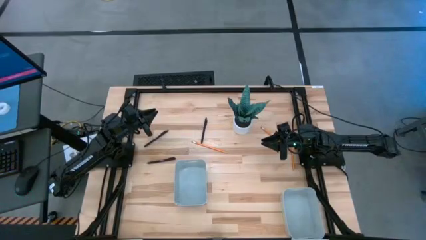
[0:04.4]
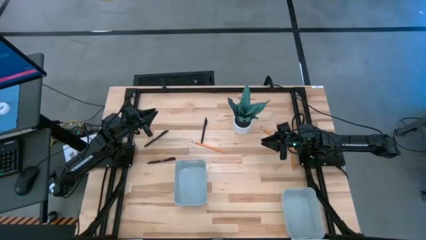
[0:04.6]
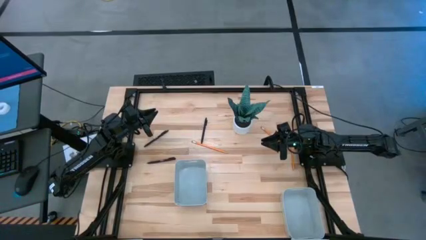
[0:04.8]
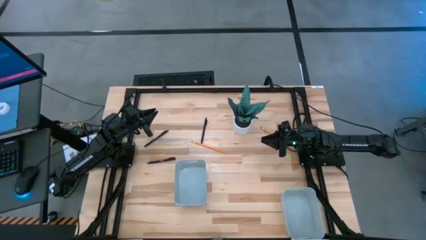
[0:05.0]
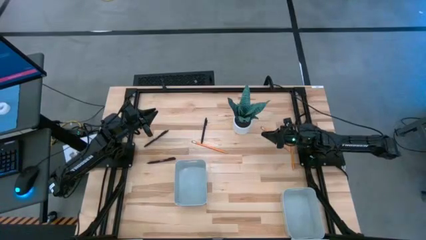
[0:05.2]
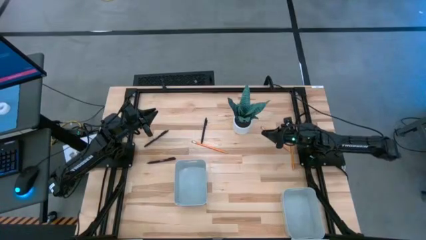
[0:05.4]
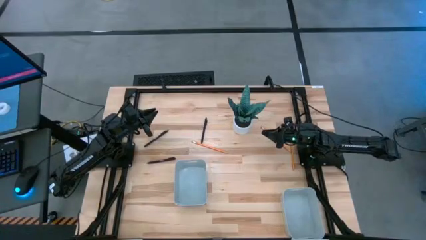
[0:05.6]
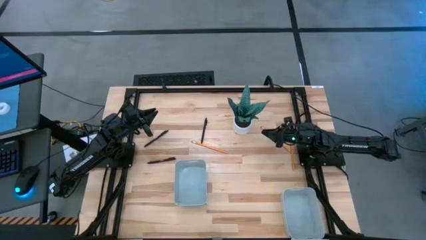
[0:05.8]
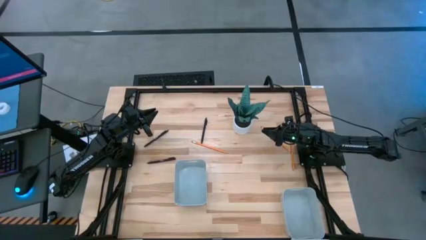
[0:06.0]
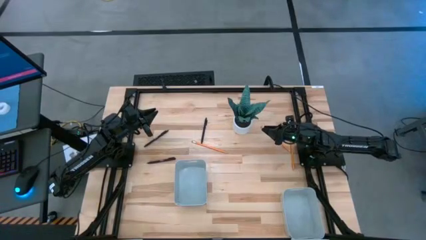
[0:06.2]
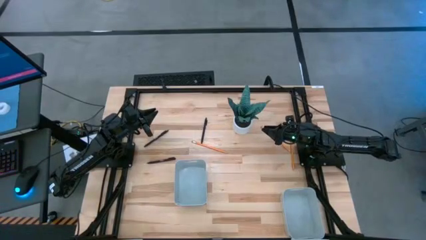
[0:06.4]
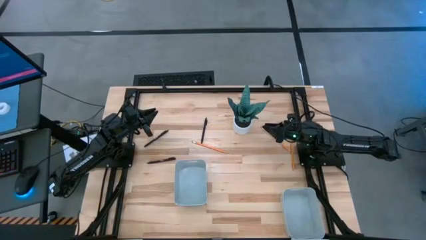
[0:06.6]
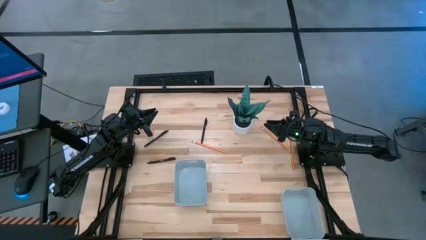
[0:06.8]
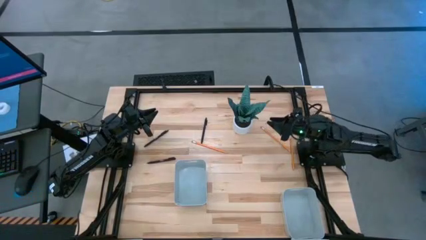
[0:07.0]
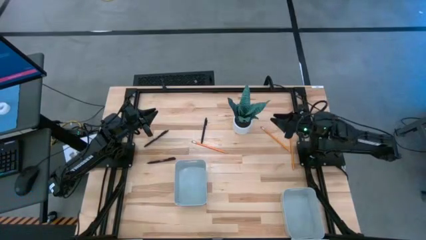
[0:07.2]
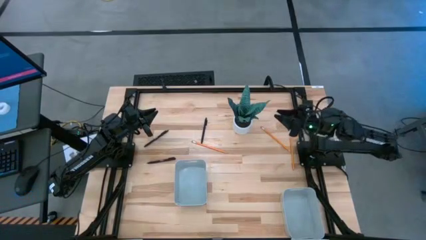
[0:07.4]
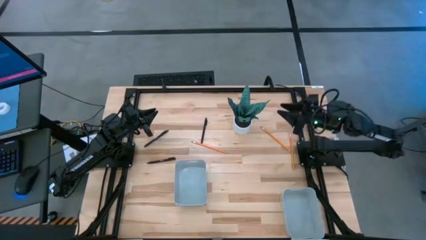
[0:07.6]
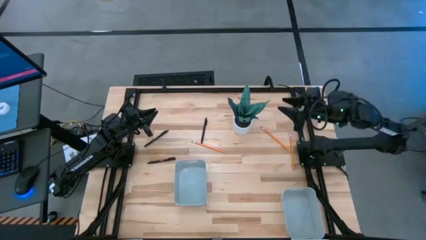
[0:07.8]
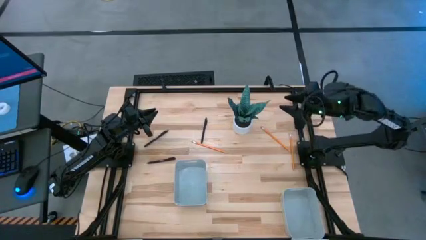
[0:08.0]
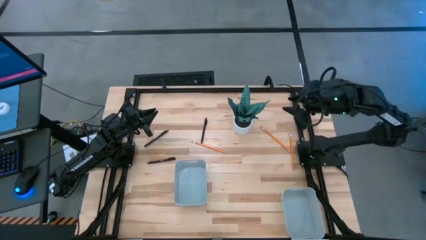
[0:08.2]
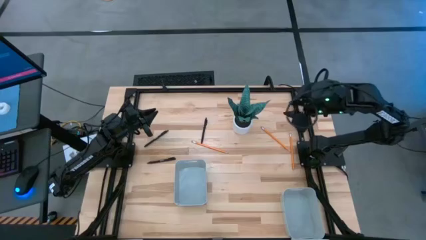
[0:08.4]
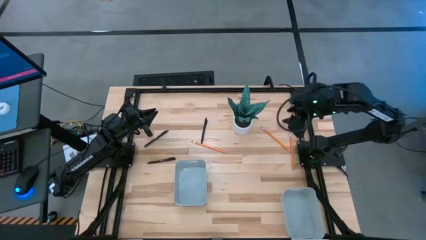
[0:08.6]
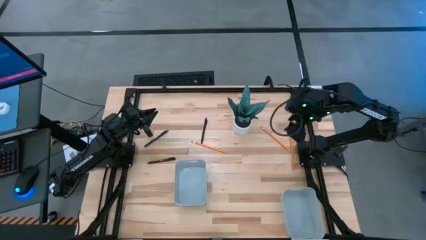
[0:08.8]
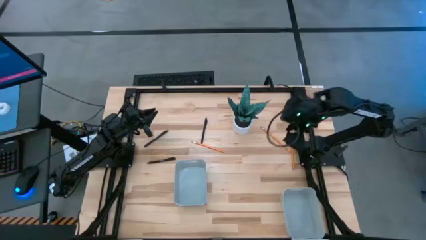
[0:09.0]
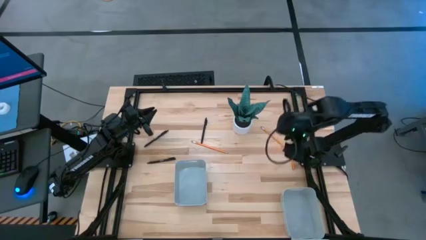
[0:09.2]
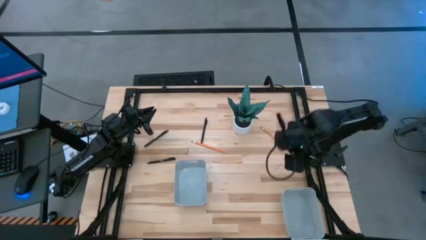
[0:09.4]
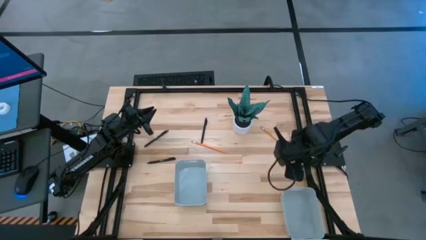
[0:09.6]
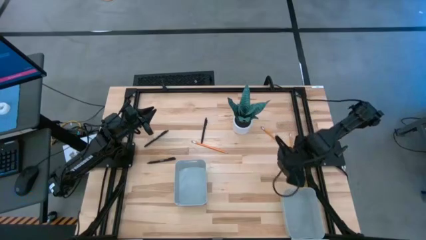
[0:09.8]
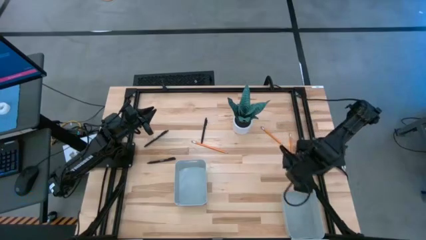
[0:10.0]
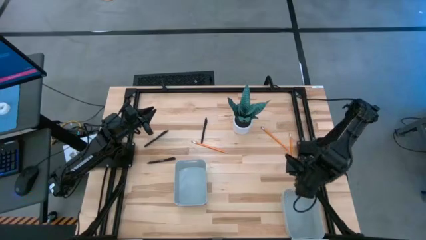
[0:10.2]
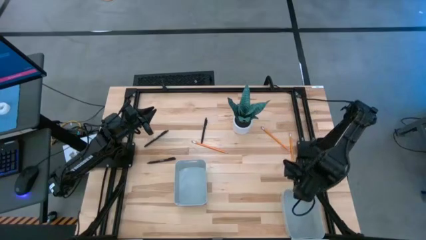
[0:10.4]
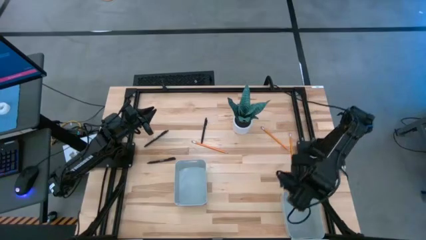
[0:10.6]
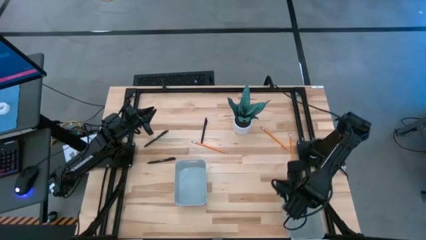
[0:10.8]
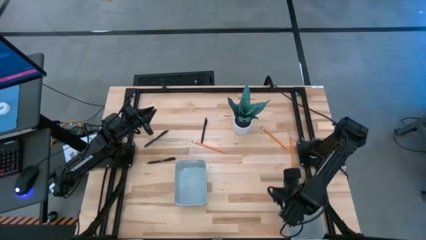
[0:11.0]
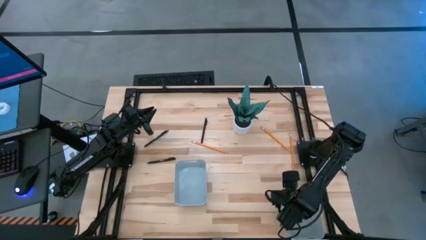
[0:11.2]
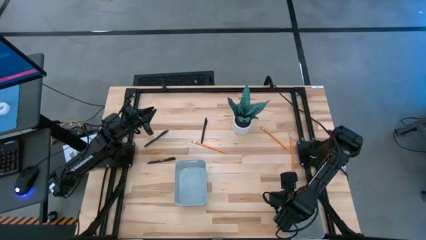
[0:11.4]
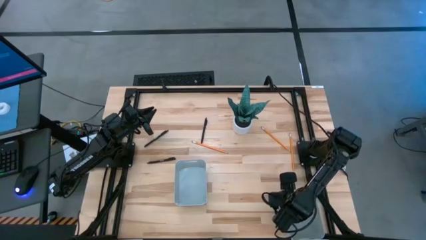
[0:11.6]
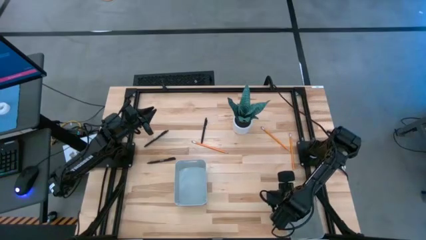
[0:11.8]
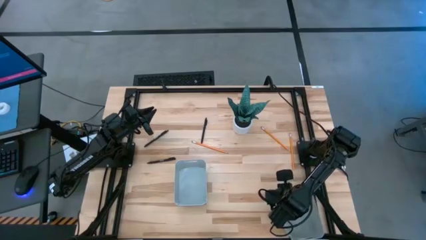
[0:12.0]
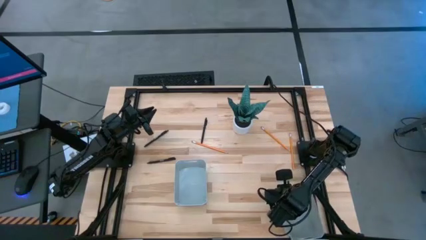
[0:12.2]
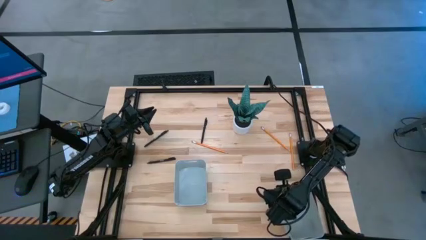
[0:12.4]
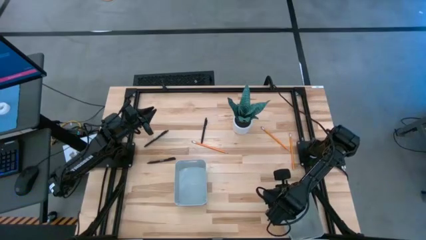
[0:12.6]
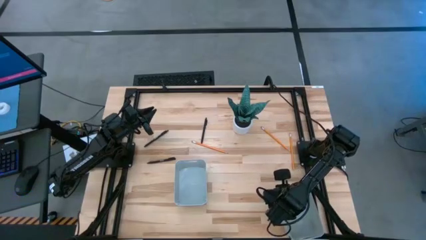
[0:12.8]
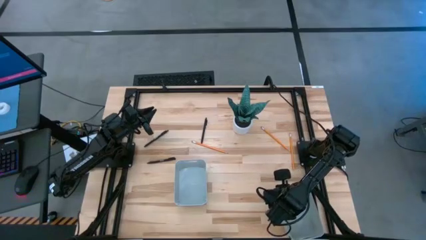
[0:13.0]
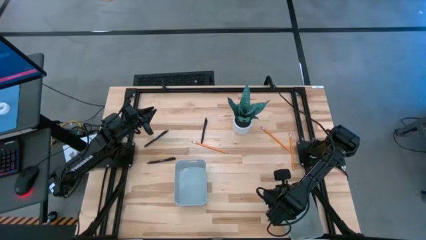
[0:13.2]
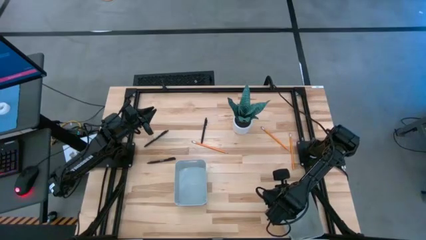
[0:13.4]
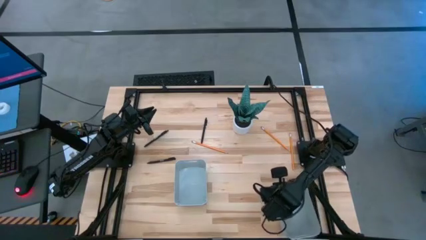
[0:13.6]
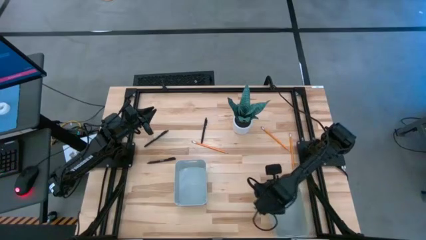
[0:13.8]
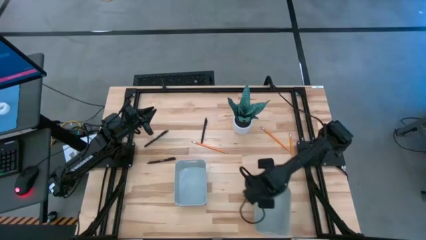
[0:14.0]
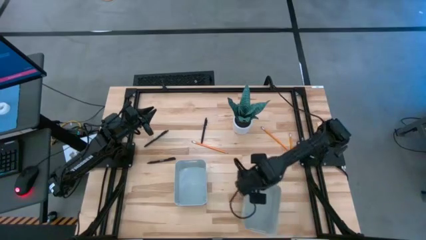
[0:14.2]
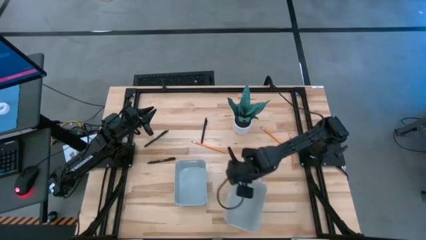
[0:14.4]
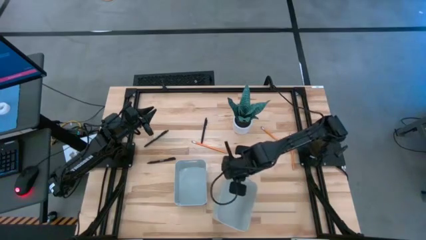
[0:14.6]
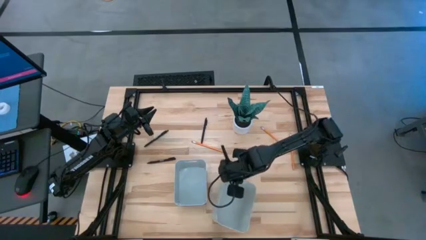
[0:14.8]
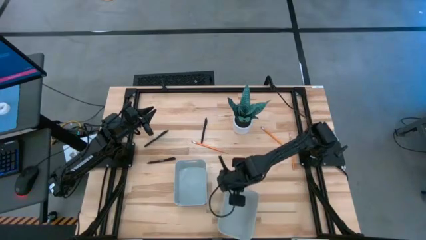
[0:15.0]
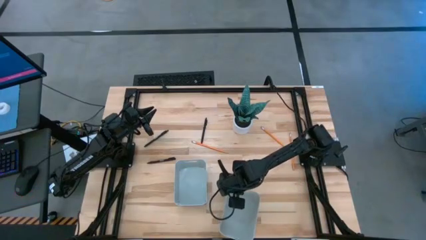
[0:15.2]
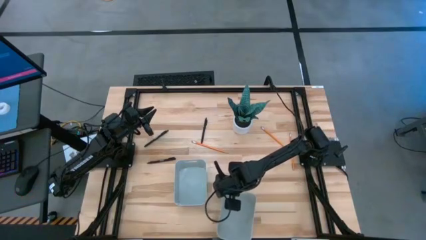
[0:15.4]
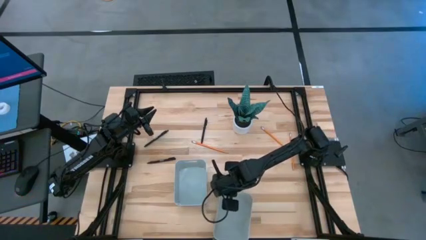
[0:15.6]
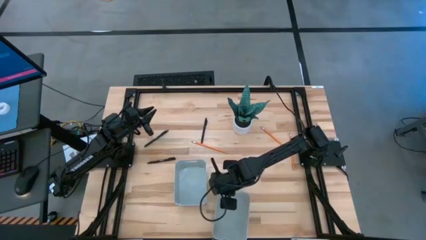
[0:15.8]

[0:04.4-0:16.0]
Task: Sort pens & pencils
Move the right gray bin to the middle bottom of the table

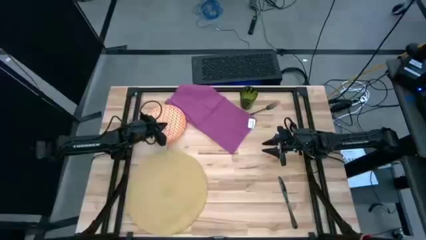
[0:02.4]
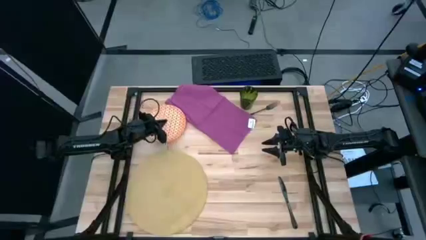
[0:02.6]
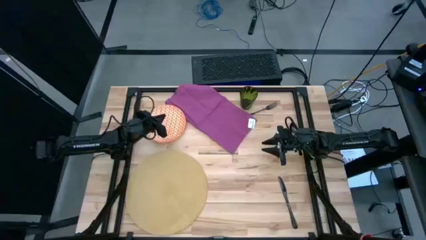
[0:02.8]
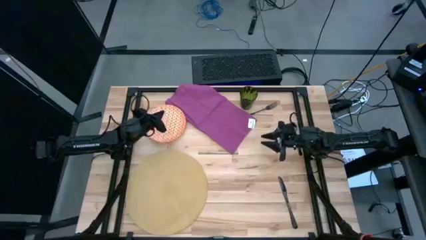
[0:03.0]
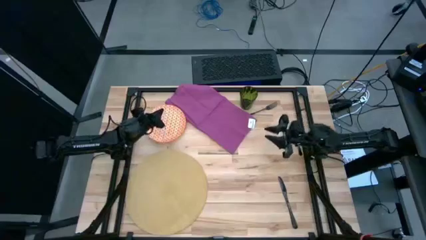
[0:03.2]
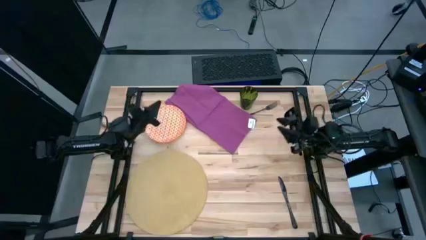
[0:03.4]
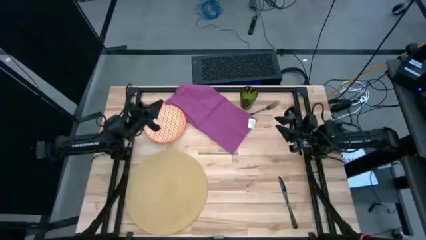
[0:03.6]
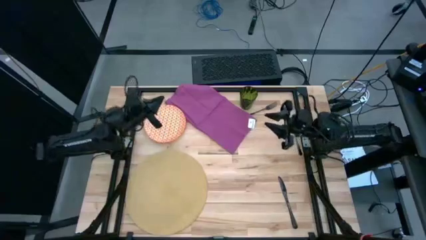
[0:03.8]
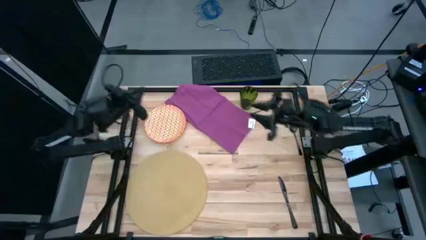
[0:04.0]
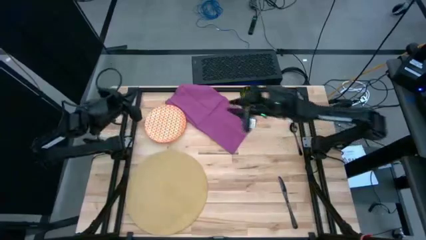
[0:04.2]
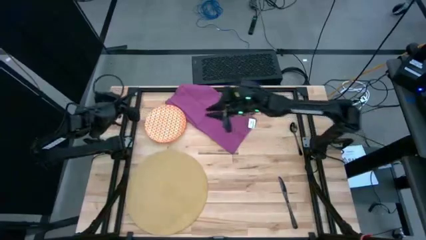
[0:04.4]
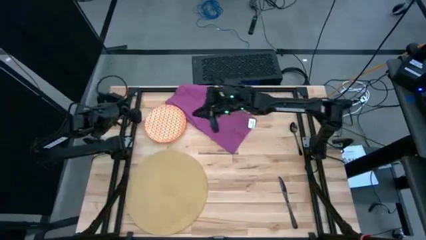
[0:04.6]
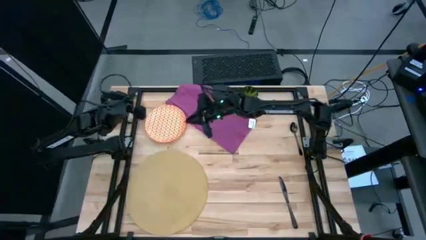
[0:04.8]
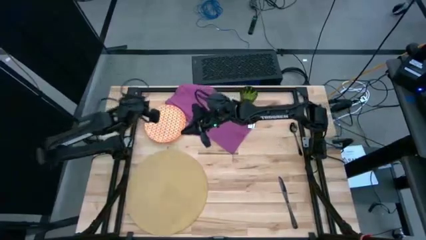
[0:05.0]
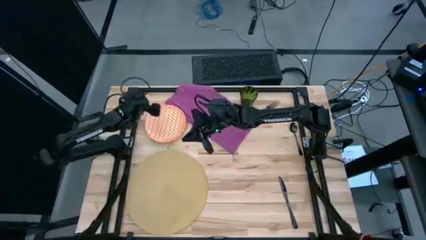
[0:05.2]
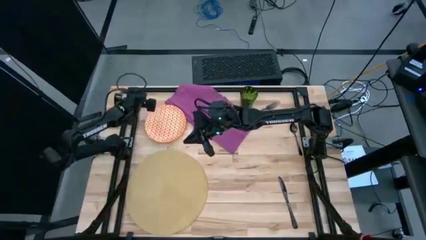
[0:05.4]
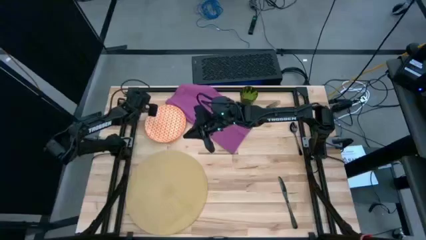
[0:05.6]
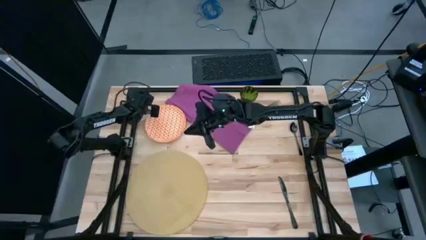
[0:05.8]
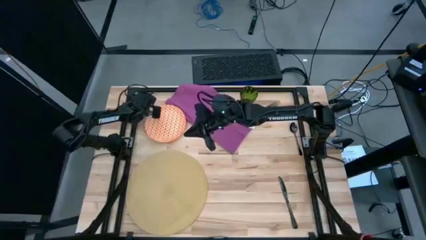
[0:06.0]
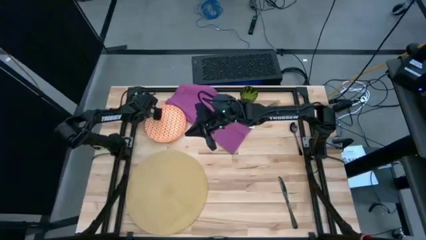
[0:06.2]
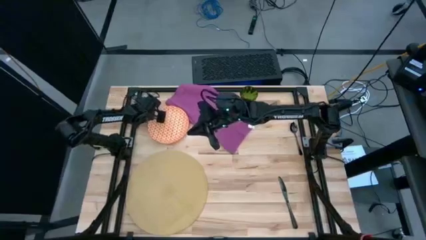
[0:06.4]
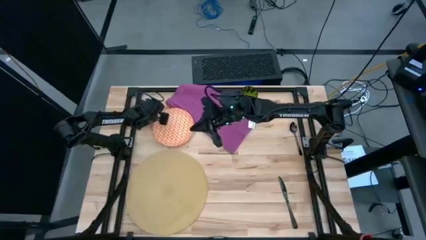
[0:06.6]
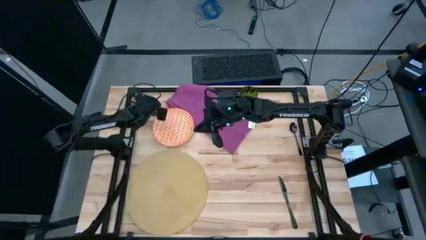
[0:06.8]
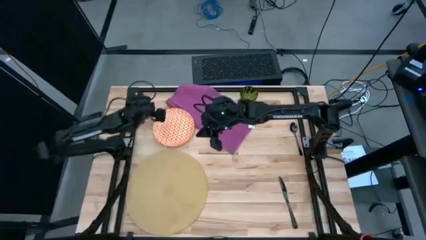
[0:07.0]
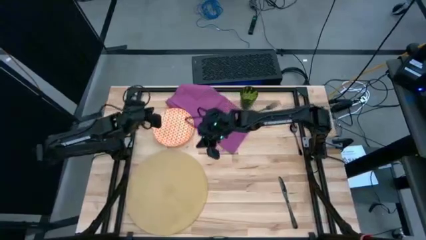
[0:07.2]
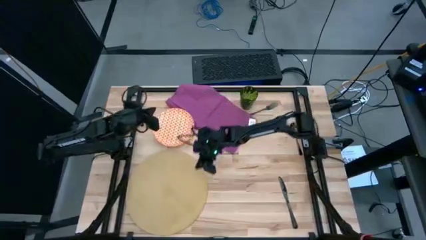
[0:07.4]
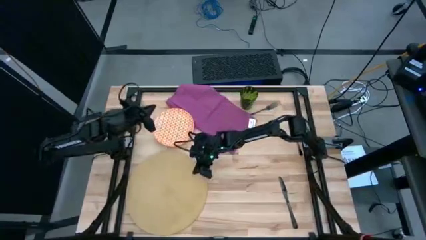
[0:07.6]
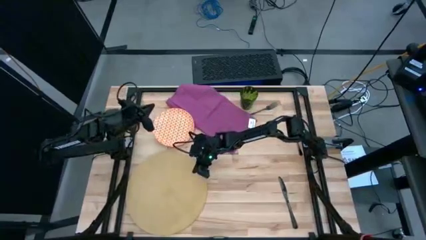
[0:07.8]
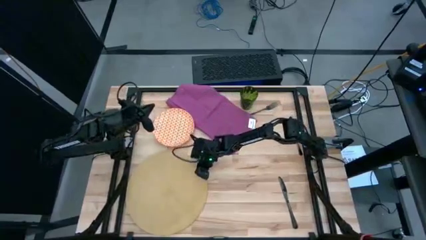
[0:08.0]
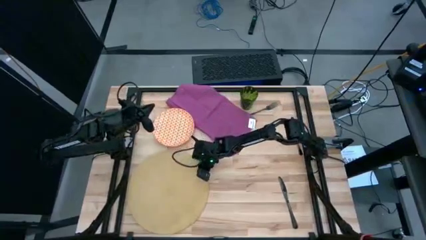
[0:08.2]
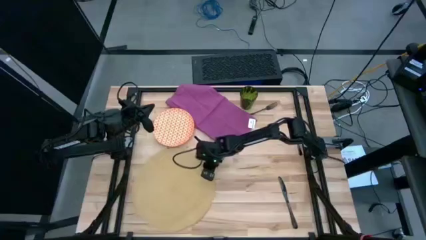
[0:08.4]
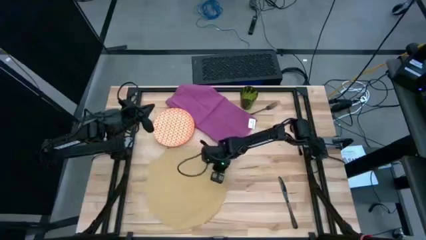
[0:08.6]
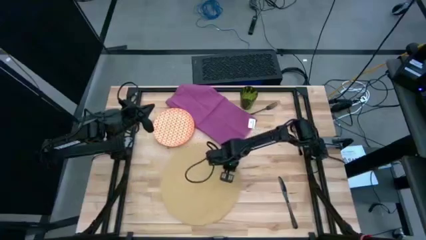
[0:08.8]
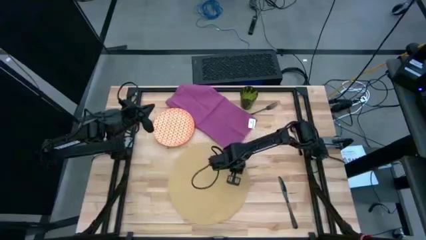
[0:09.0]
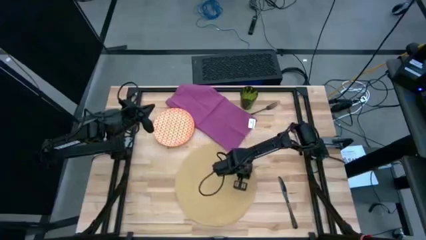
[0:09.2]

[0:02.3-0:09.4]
Task: Set table place
Move the brown table mat
